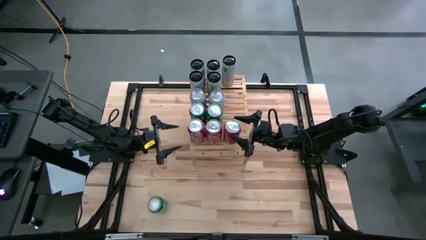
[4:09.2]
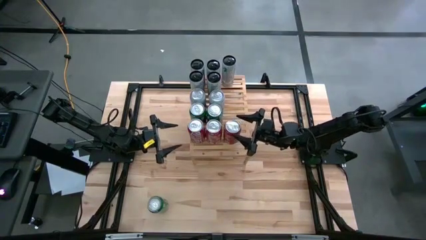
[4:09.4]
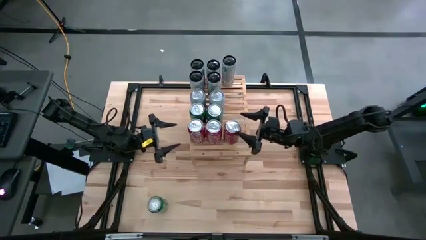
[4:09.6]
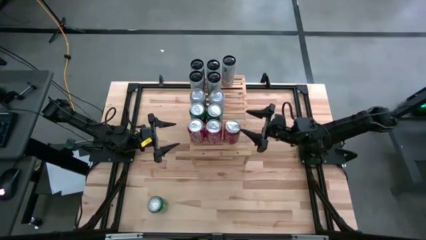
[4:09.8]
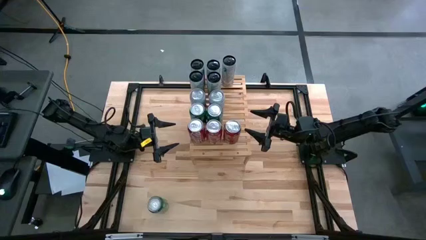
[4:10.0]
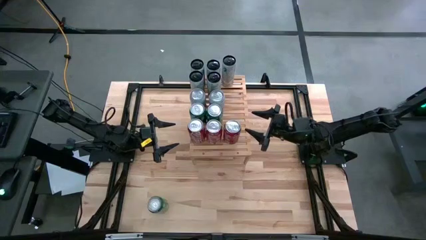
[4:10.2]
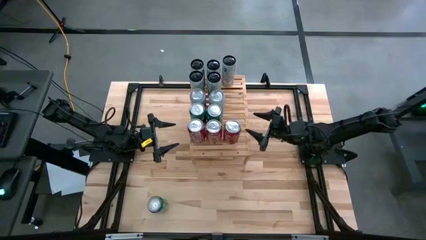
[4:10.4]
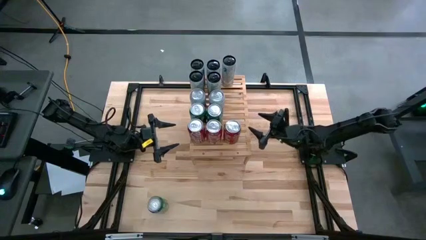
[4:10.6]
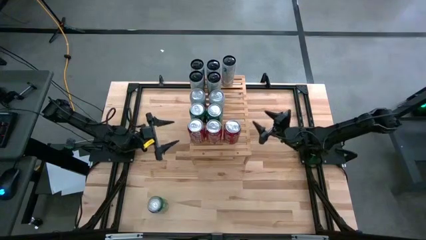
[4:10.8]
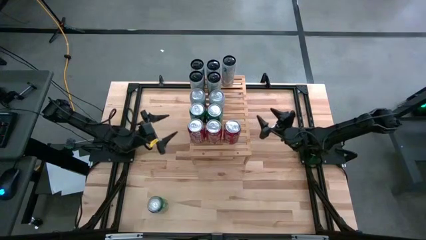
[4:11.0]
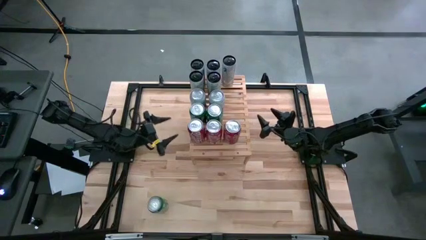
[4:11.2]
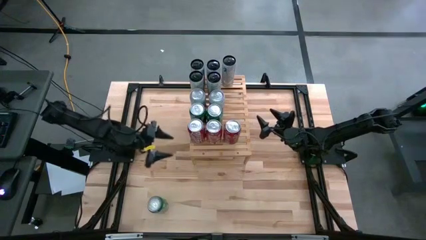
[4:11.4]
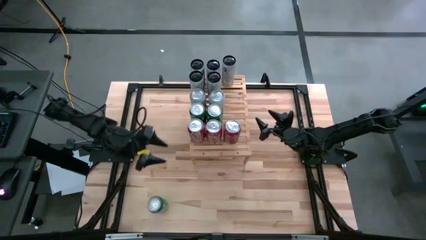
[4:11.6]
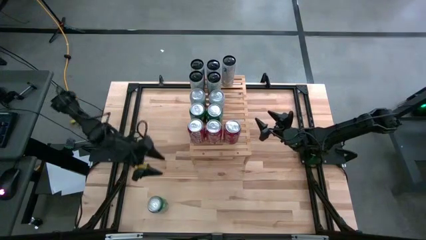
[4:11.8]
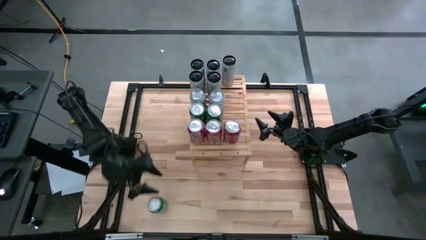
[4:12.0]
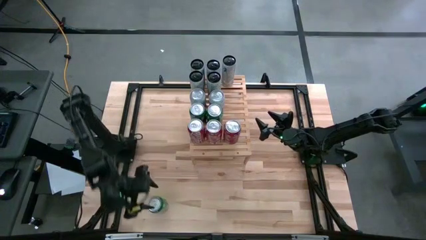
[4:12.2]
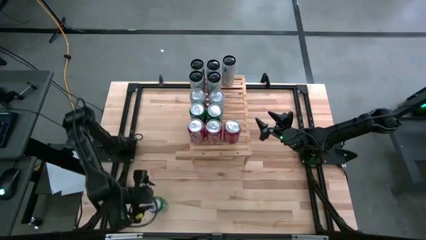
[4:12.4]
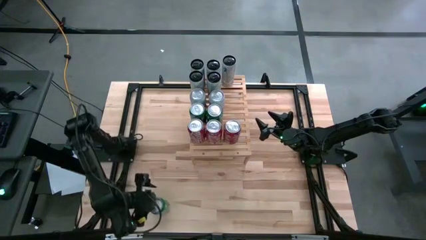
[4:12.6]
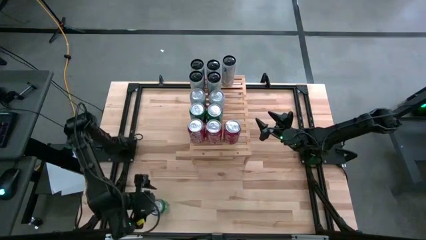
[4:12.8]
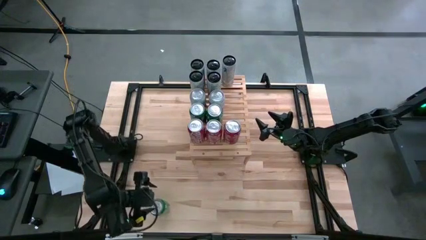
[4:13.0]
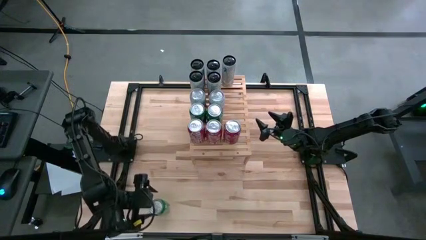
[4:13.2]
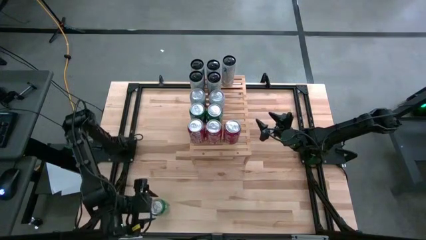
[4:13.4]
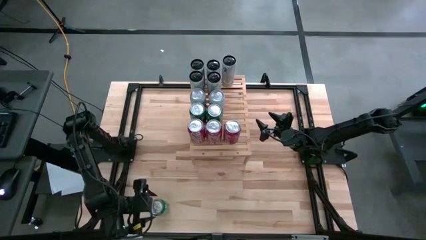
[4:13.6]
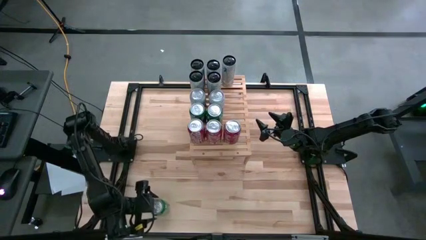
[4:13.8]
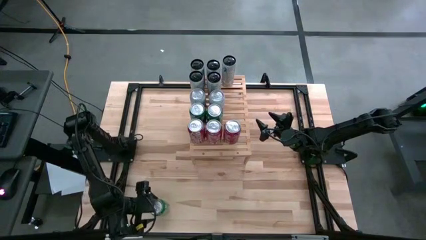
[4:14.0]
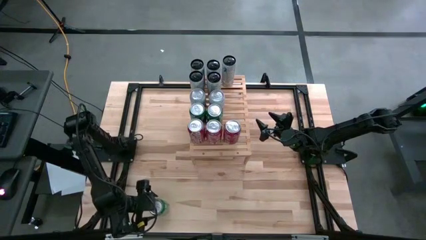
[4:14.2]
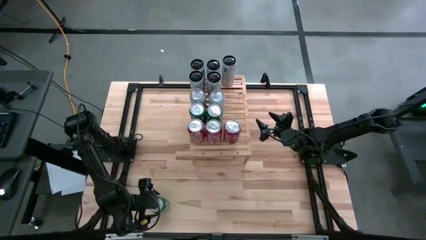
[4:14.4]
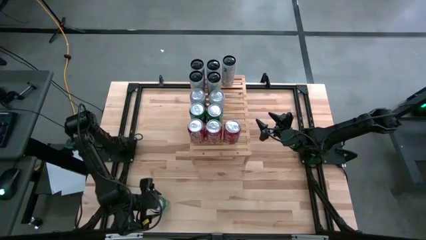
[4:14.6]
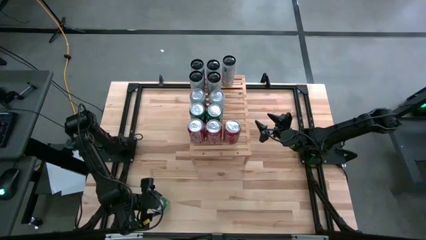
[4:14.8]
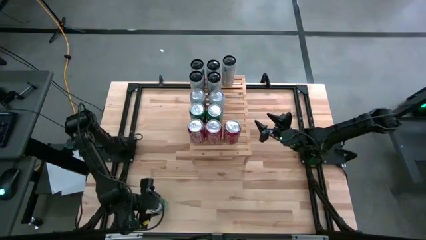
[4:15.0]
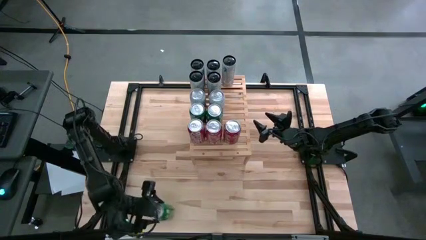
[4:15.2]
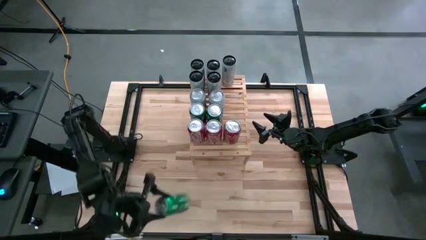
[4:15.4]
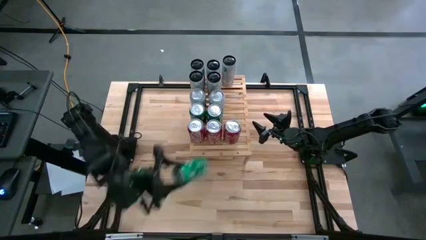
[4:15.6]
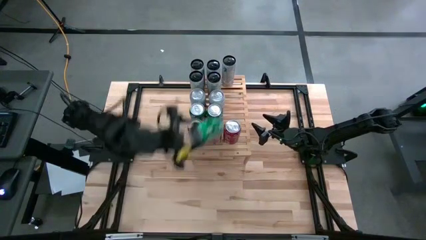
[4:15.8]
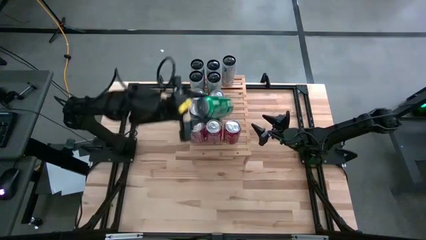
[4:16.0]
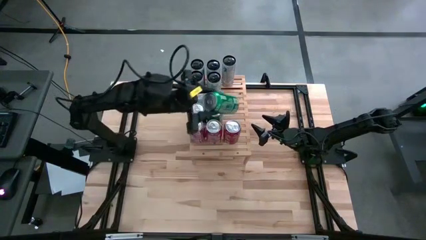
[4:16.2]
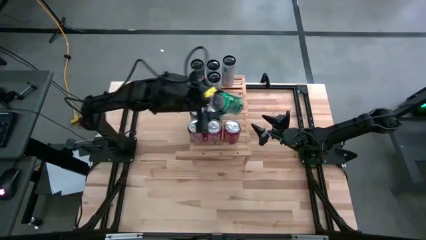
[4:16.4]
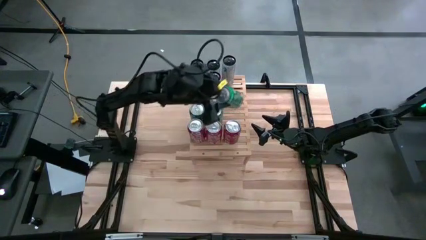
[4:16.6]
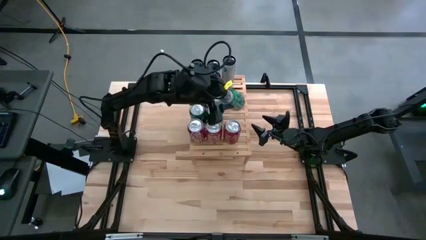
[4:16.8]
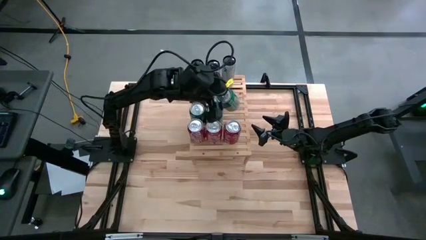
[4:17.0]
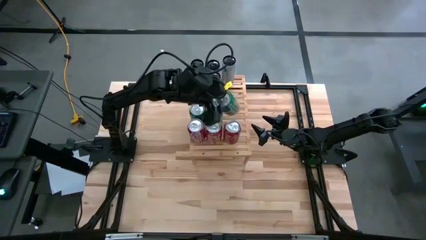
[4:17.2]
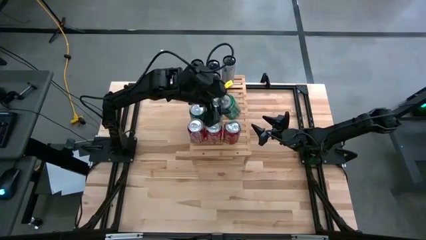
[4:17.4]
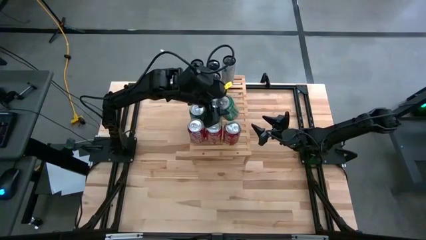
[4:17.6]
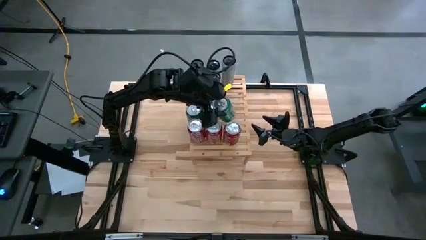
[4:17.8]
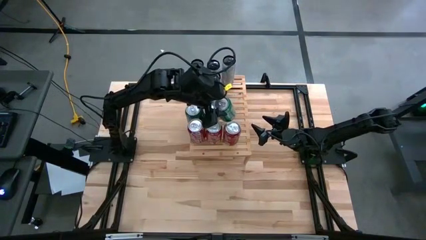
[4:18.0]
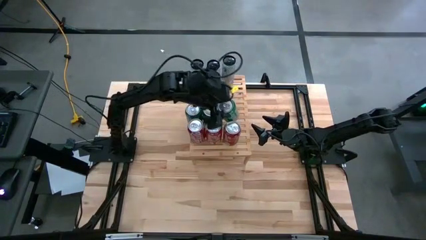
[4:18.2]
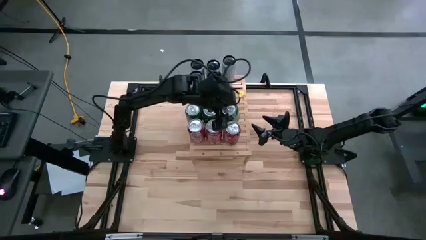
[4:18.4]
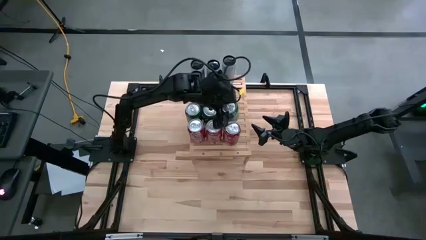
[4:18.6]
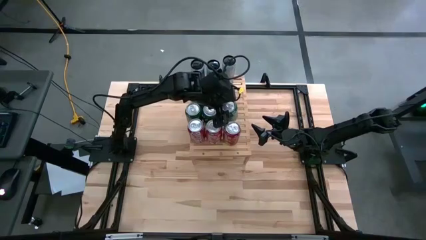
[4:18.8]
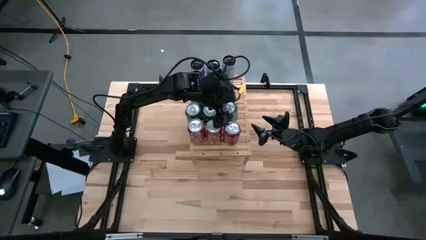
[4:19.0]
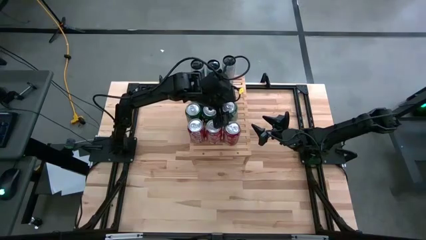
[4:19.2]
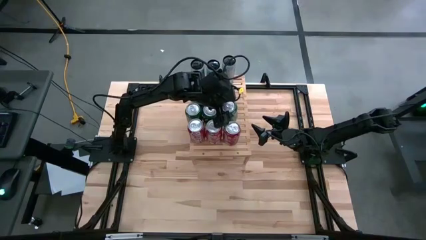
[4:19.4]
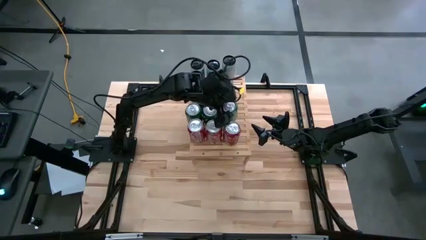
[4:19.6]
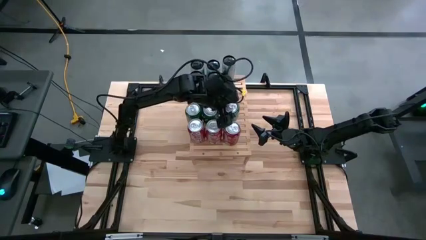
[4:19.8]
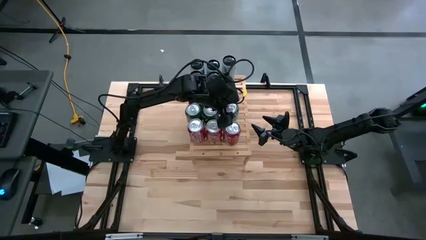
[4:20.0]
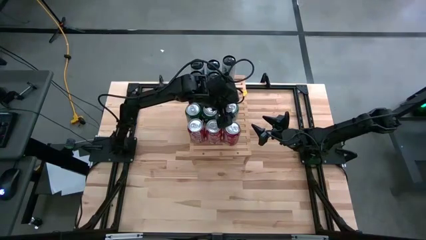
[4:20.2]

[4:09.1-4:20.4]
Task: Place canned beverage on shelf
Put the top green soda can aligned with the other green soda cans on the shelf

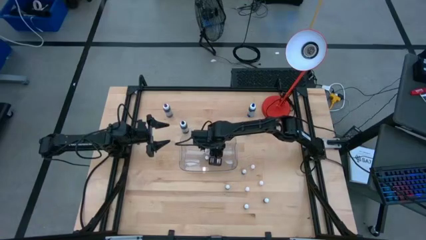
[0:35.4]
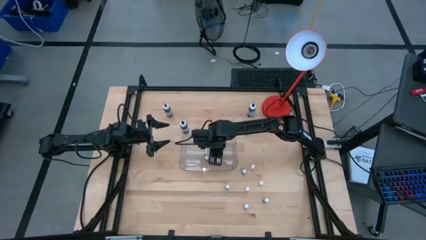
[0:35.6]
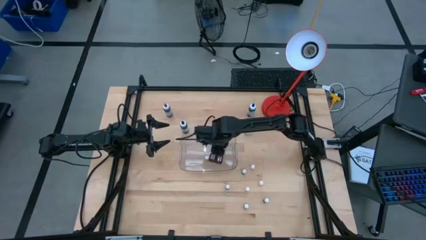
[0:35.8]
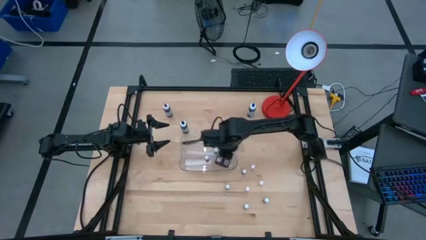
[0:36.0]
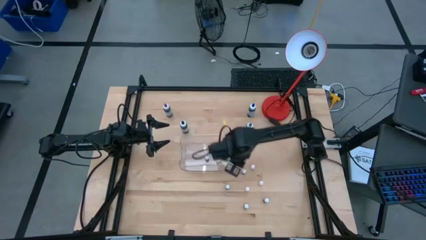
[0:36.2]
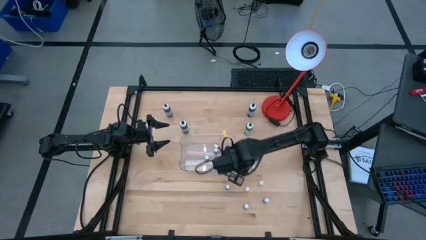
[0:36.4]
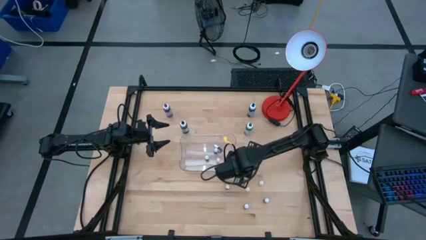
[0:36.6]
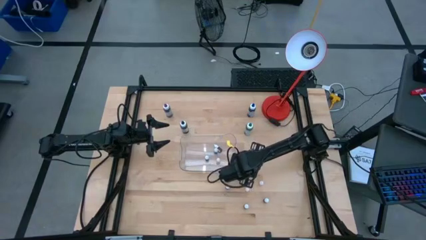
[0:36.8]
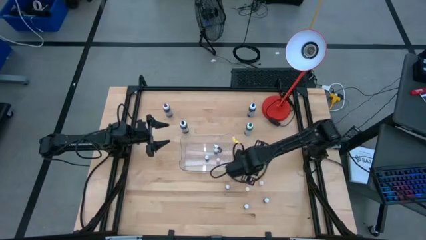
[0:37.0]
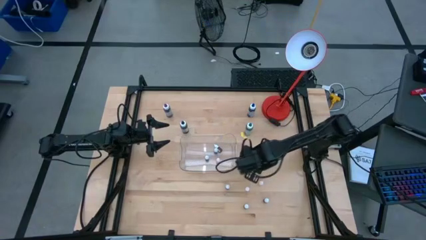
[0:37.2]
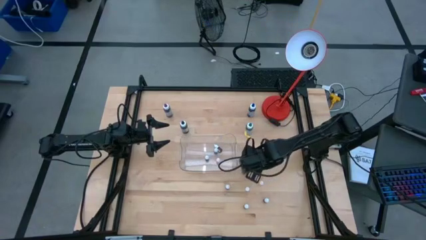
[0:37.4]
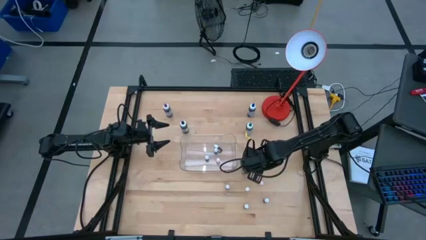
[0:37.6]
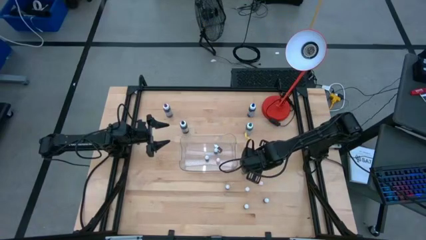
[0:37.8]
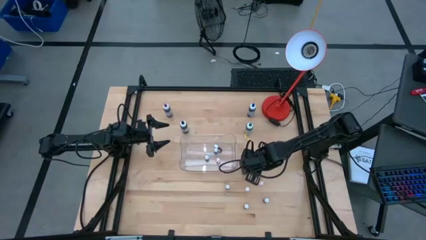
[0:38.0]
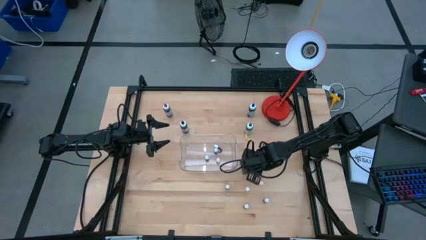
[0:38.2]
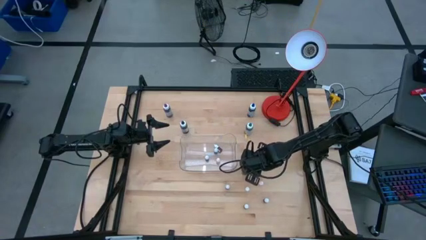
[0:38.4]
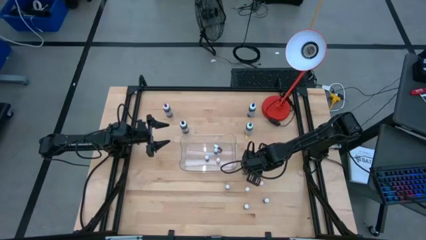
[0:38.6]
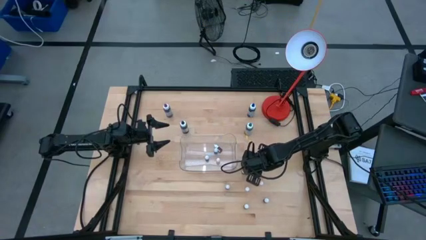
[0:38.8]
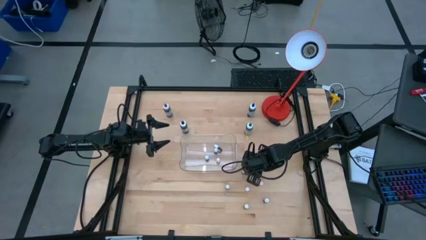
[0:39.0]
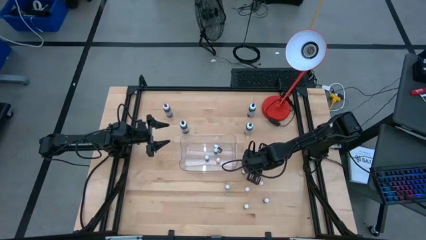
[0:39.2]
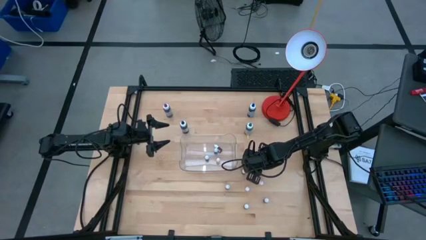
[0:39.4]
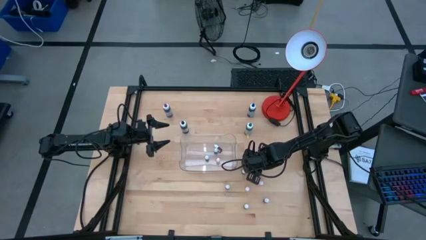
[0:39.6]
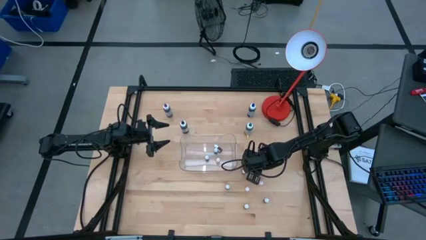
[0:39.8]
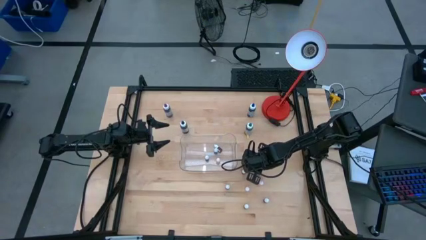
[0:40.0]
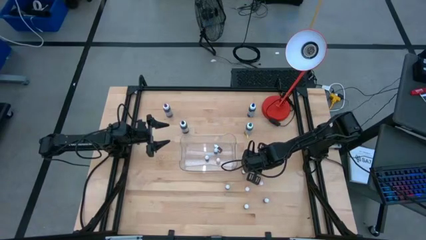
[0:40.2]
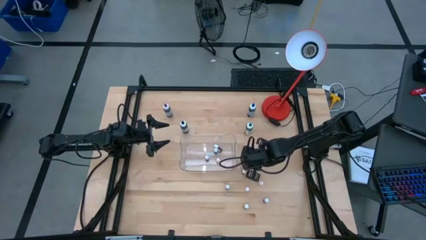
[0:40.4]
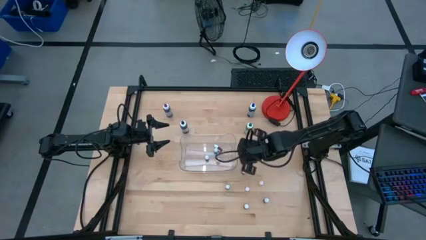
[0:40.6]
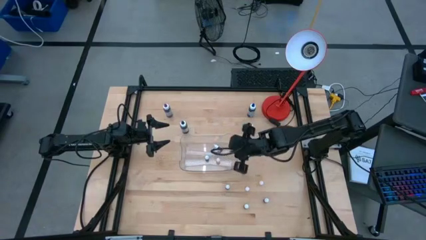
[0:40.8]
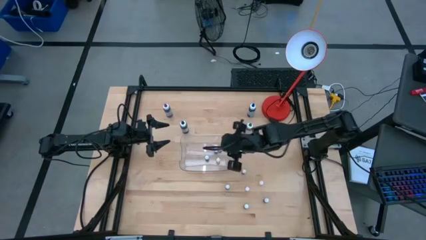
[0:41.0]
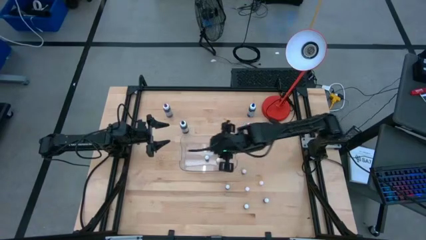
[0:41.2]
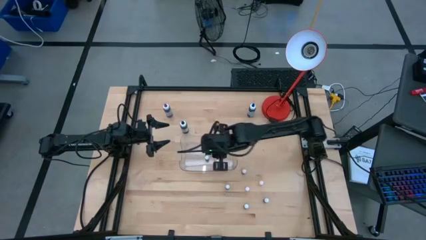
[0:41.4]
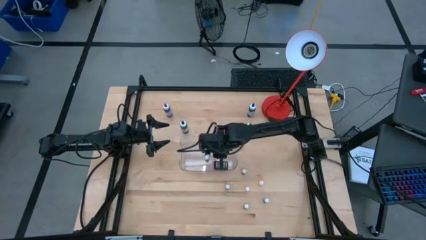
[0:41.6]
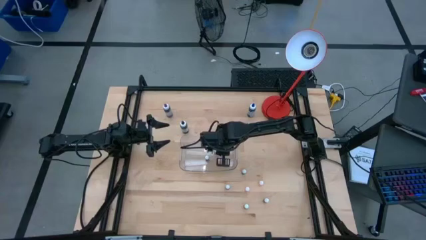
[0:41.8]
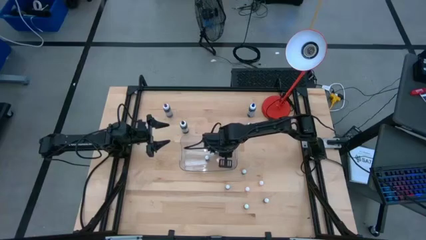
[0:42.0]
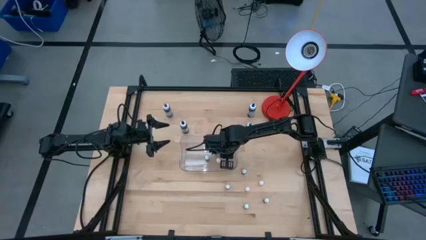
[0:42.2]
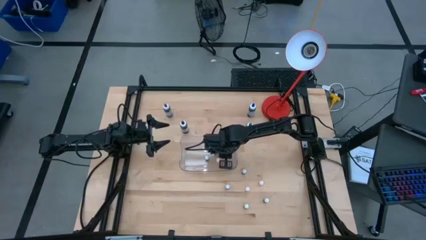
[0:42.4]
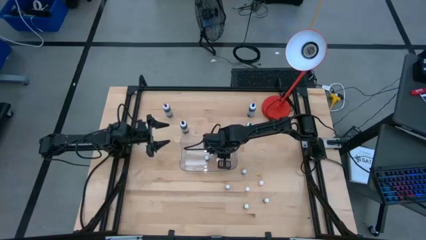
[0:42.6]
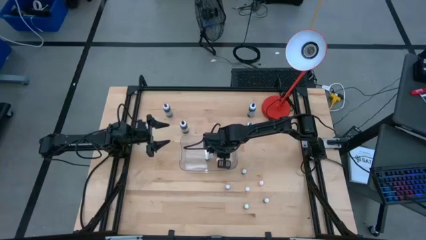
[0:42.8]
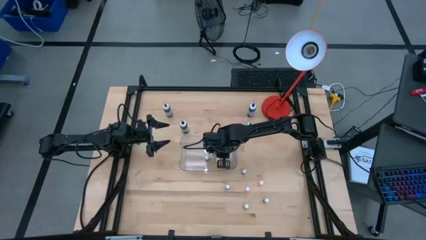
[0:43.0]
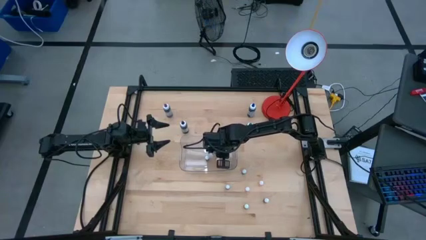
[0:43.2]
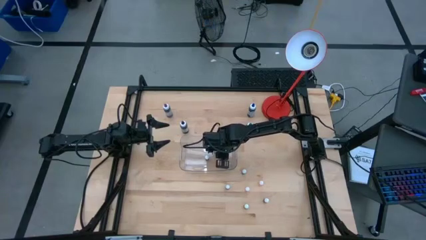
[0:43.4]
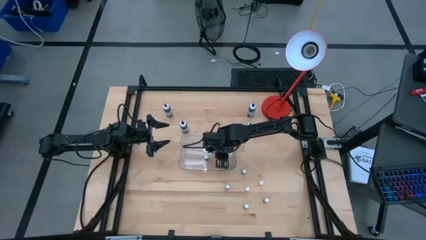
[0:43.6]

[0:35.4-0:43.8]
Task: Pick & Place food coloring
Put the orange food coloring bottle into the transparent bin
